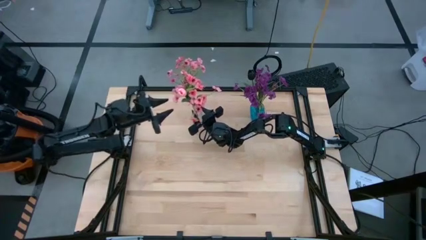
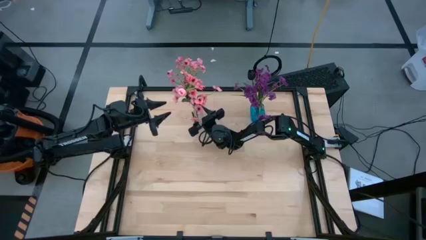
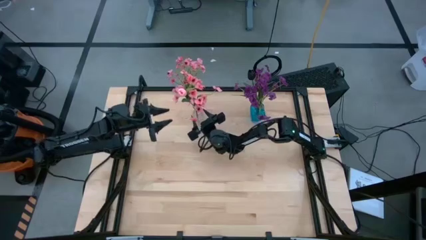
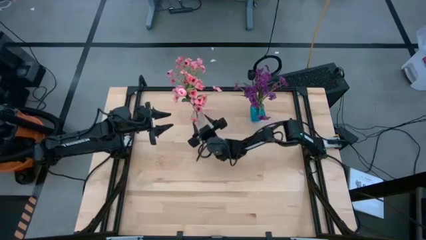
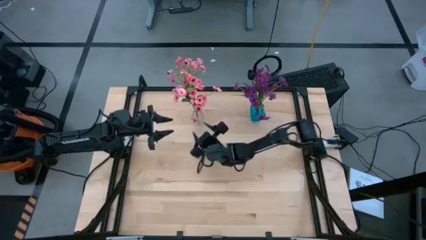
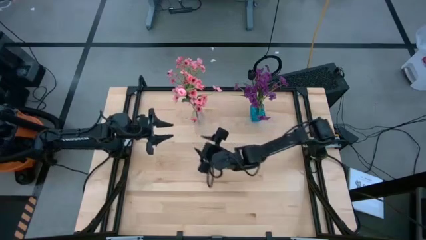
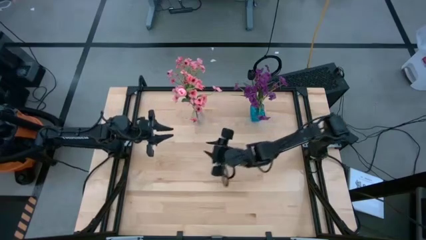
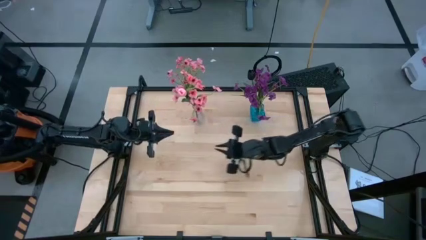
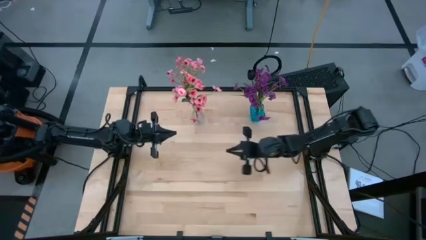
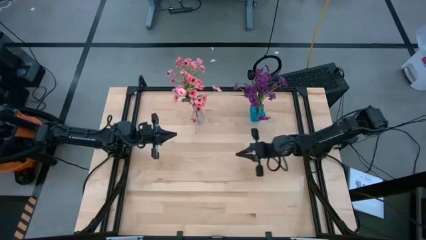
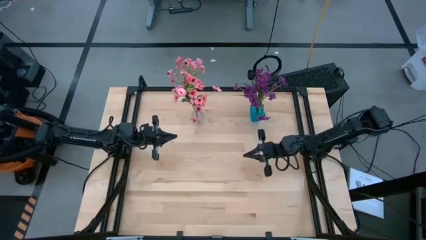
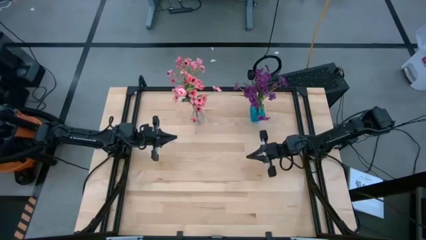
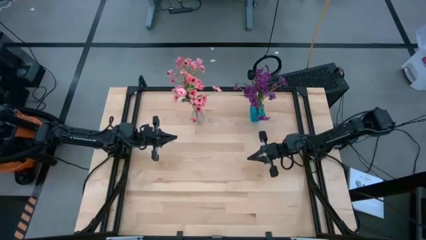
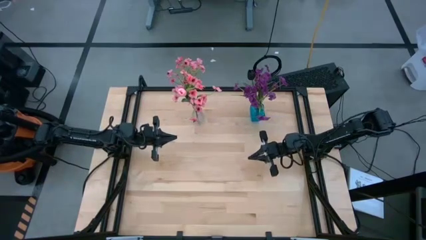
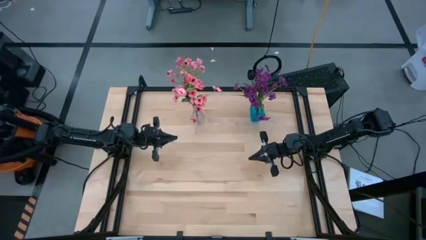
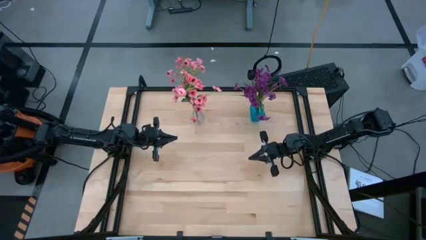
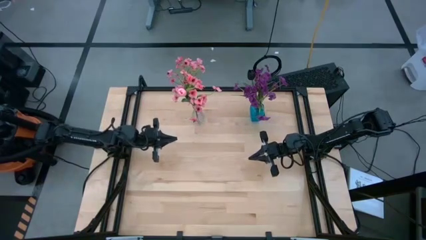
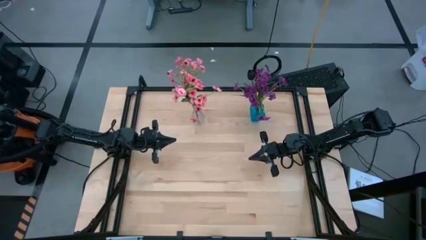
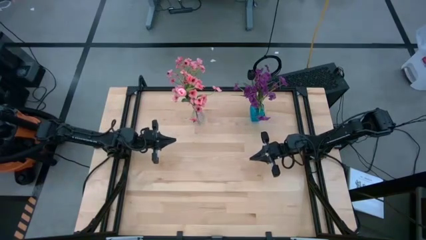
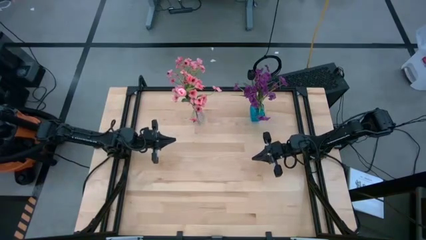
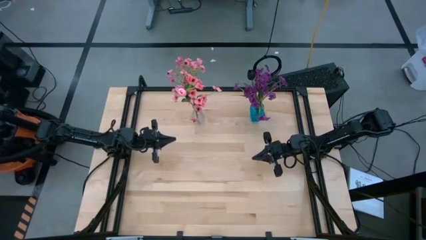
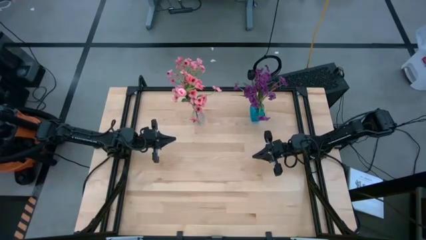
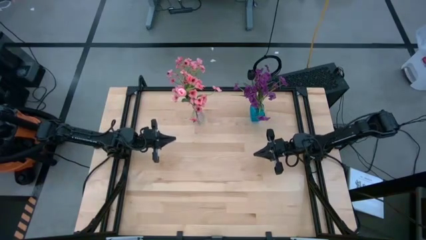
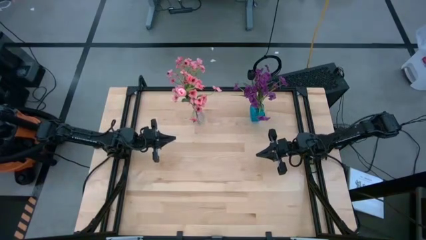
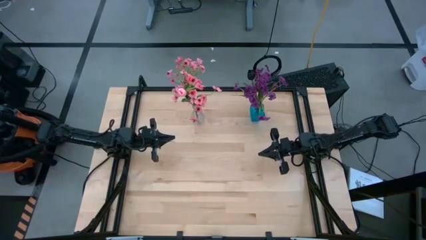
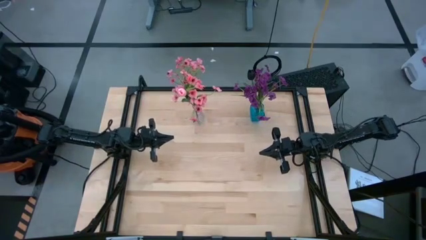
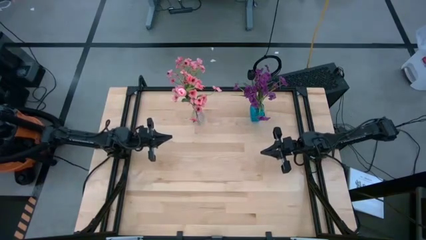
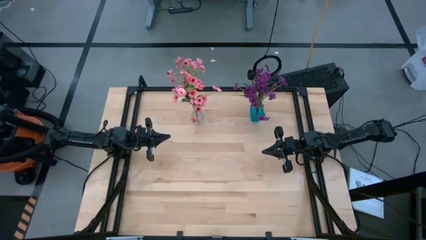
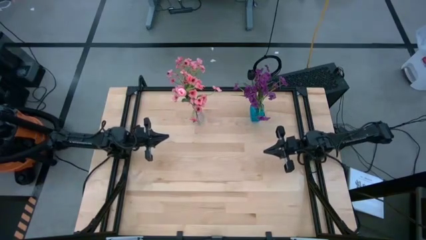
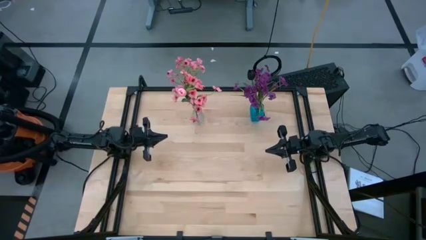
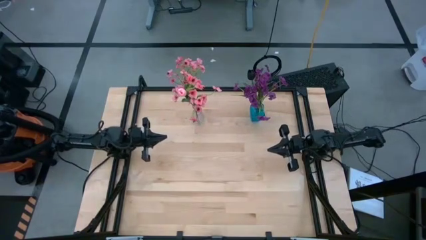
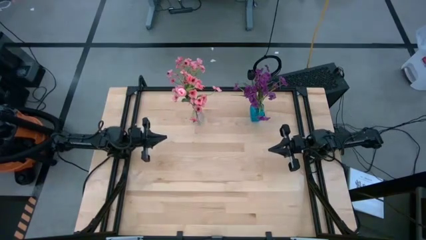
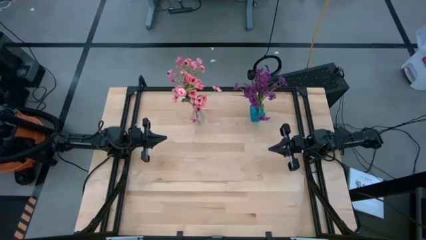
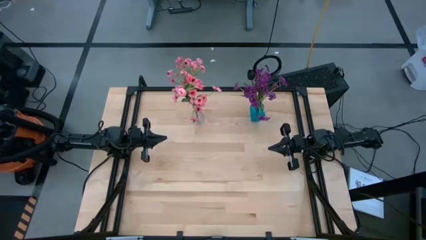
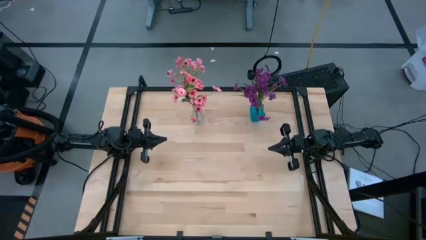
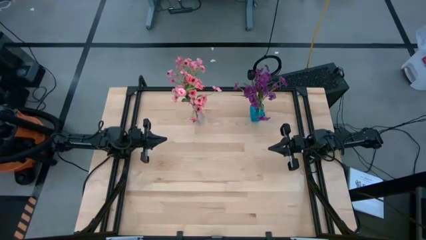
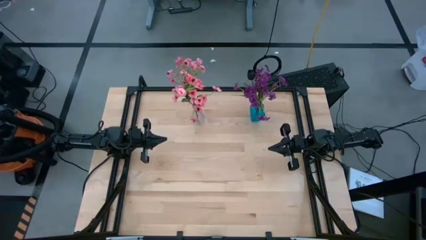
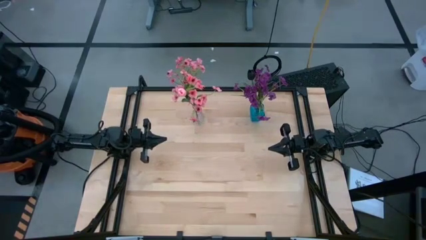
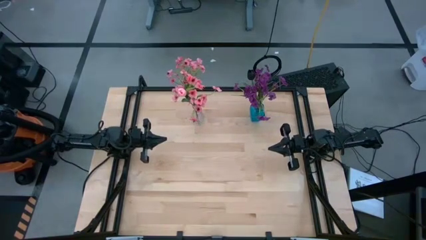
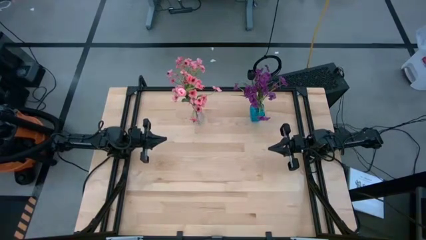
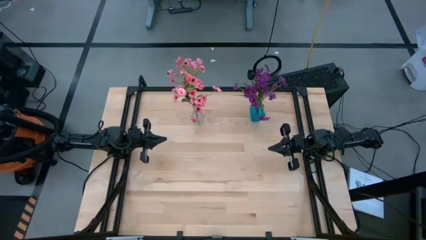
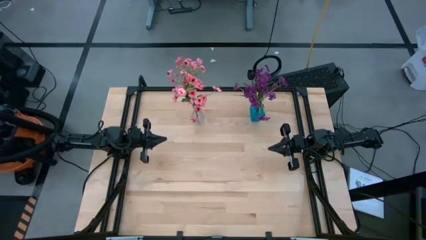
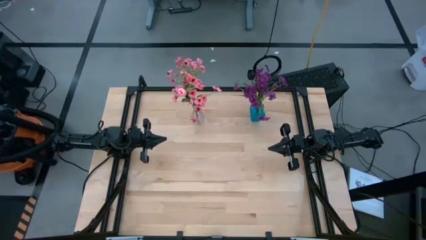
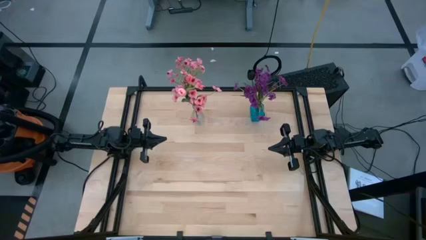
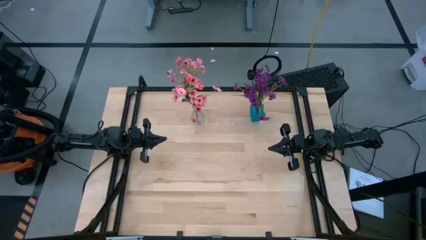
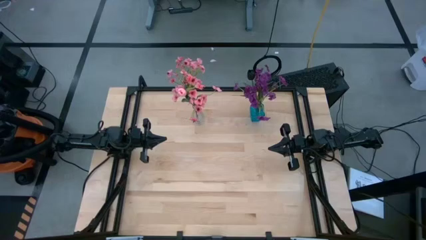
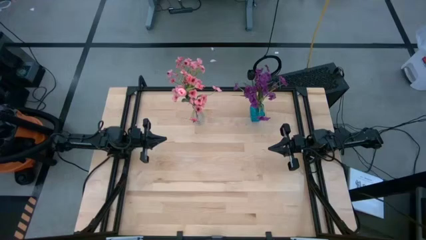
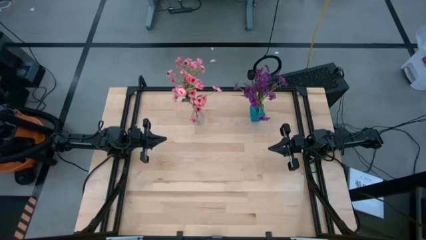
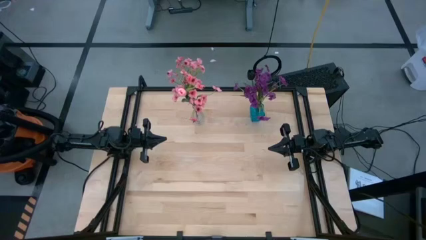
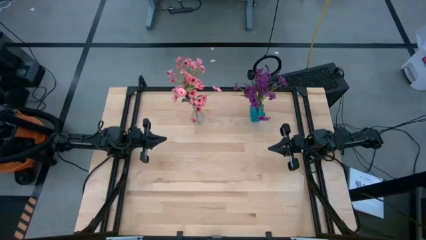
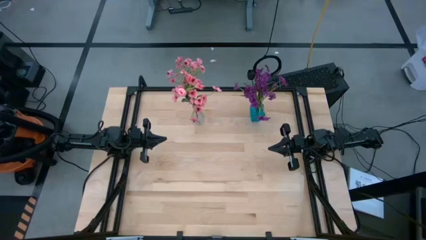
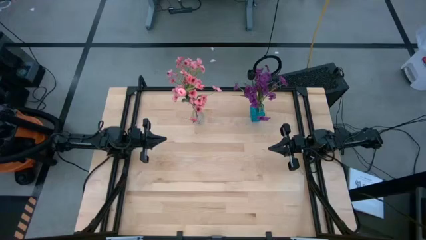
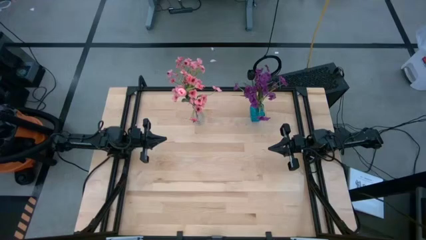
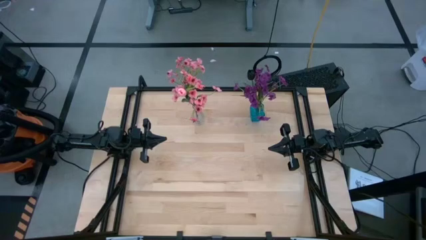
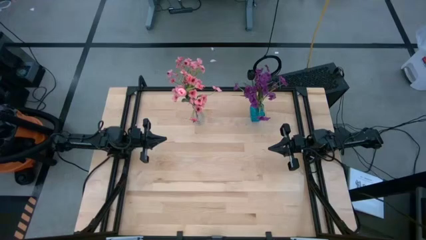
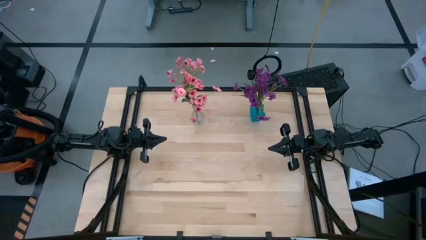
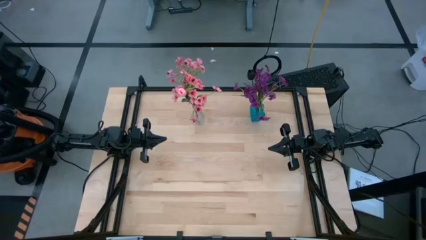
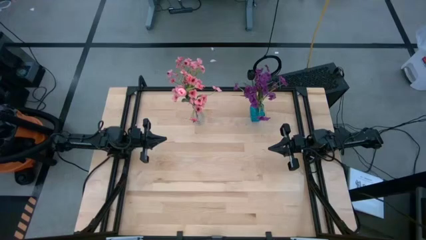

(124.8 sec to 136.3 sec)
Task: Sort flowers into vase by color
Return to Home Position
